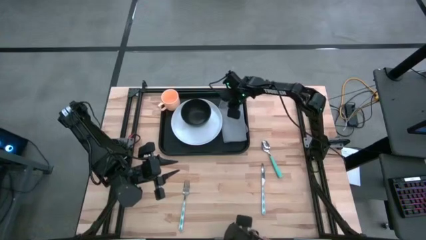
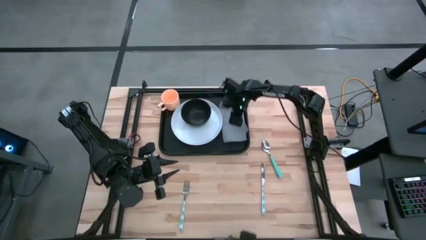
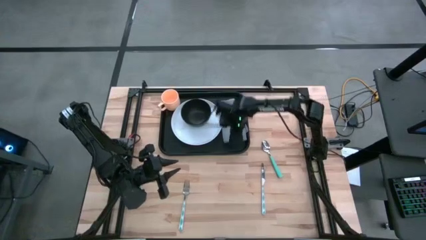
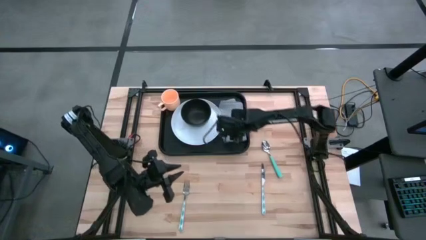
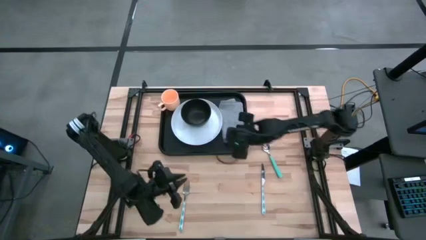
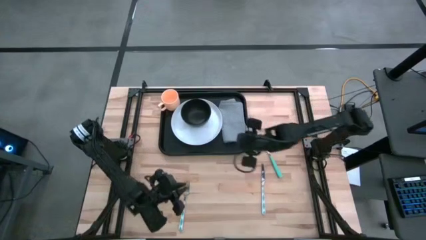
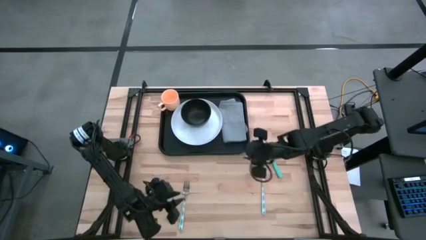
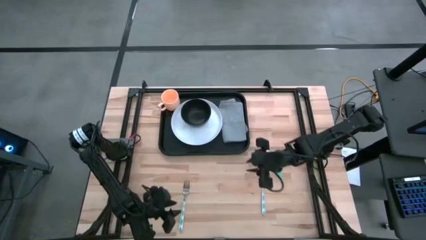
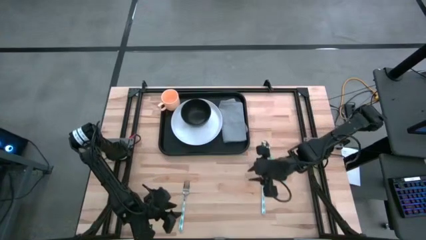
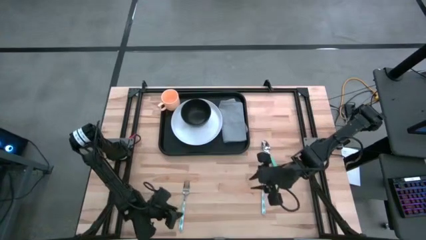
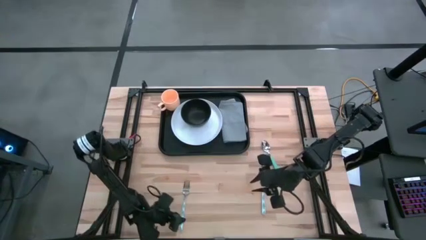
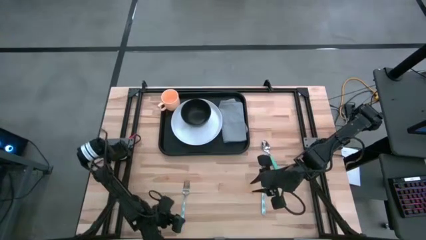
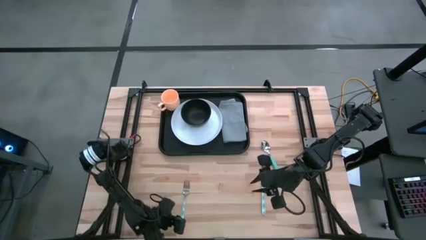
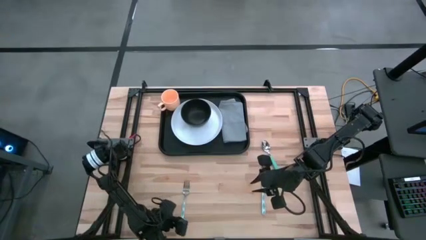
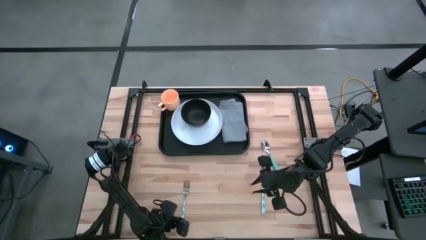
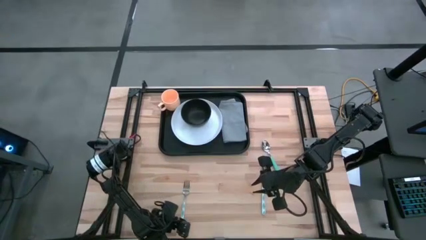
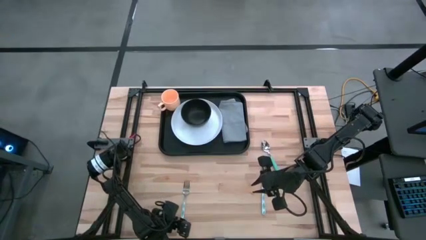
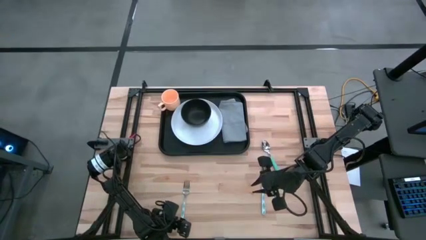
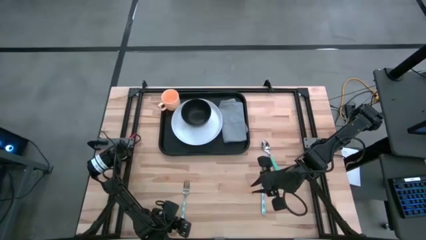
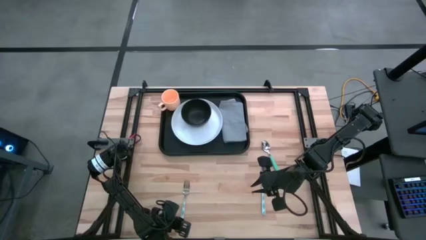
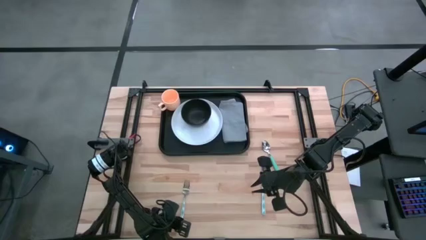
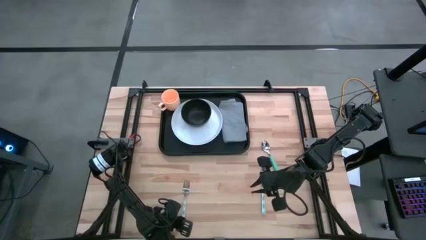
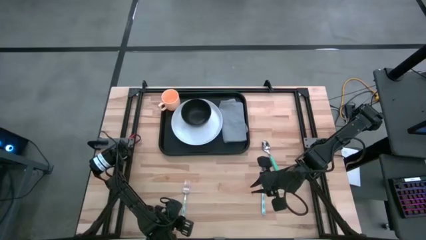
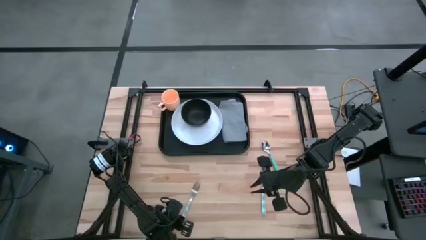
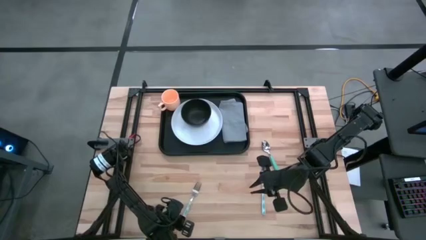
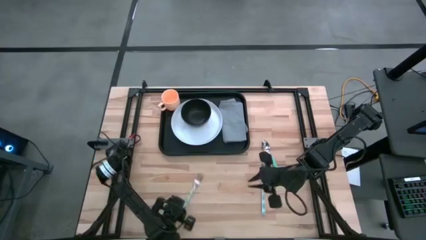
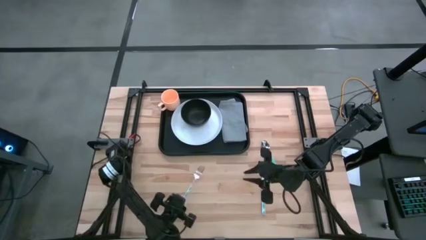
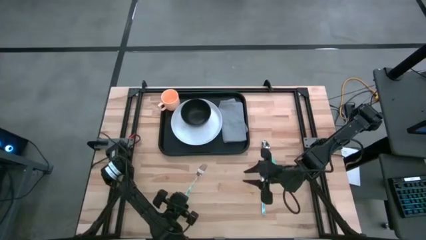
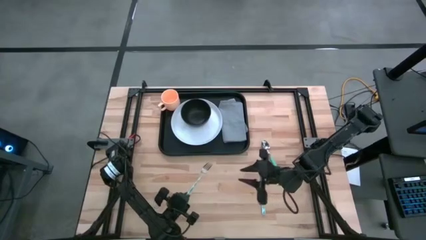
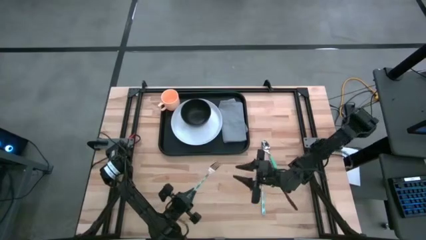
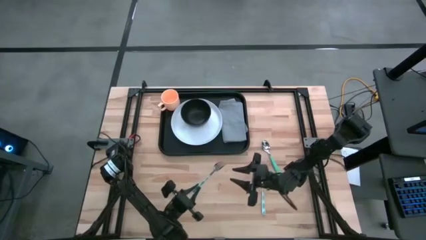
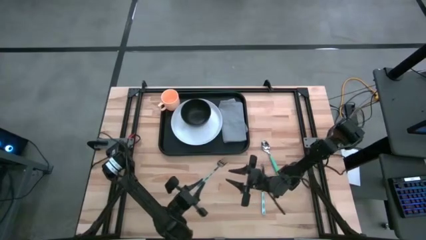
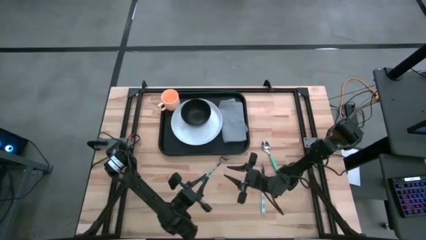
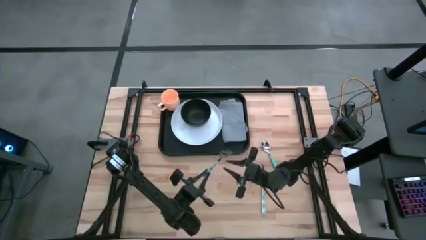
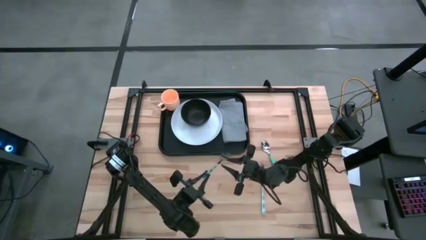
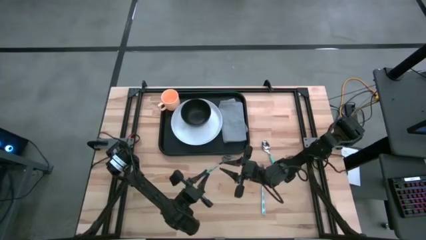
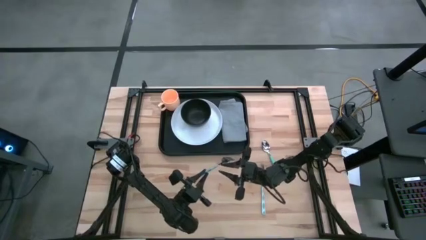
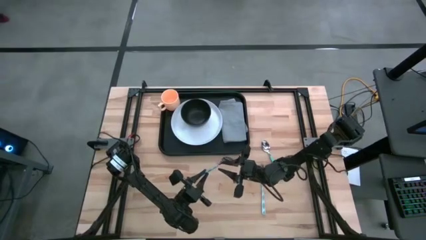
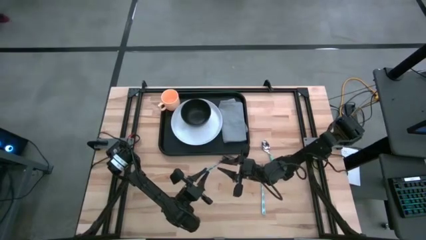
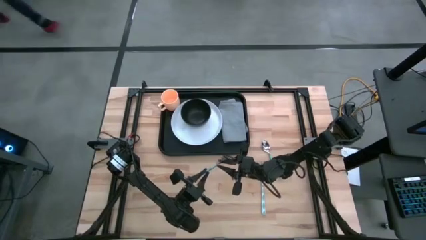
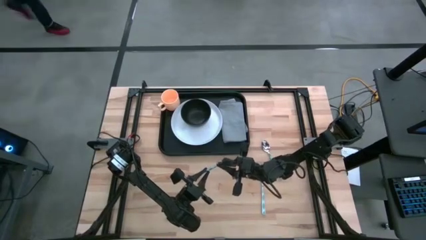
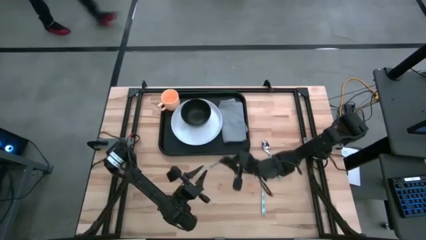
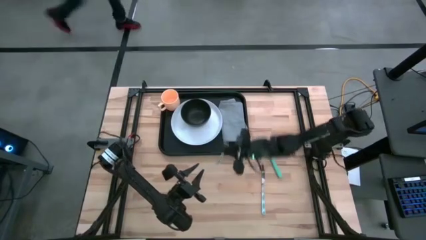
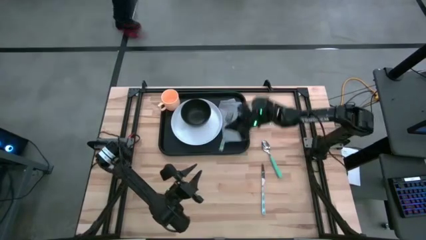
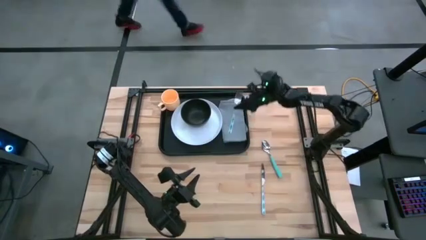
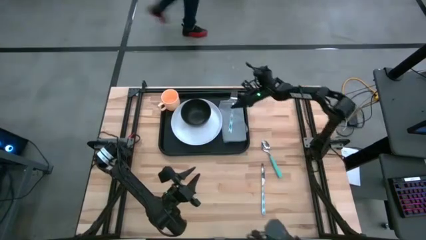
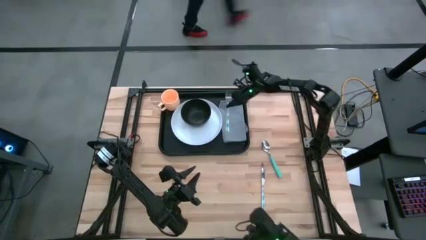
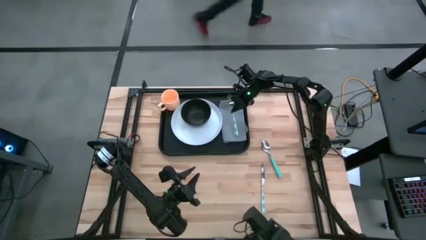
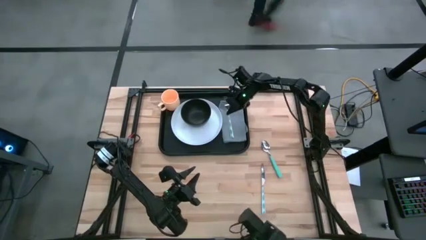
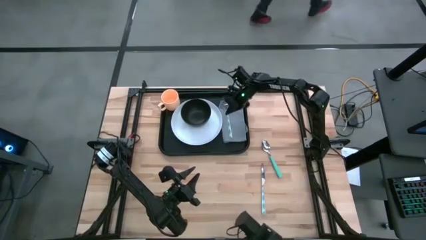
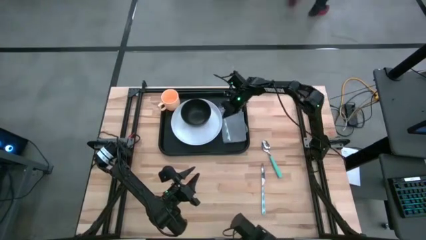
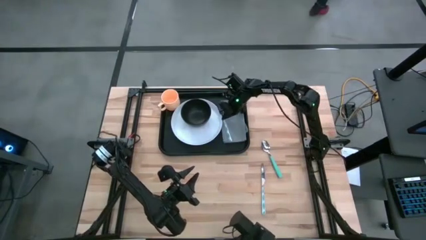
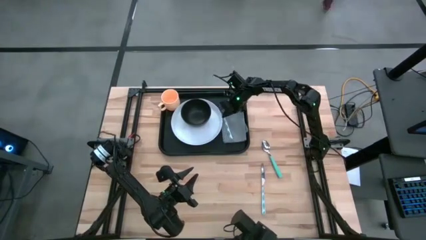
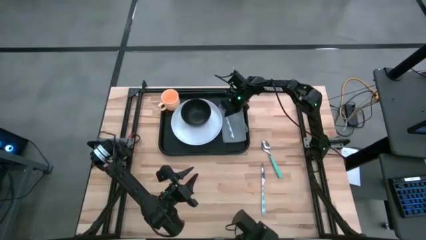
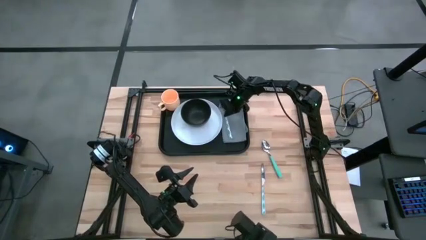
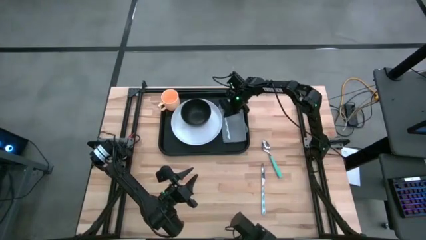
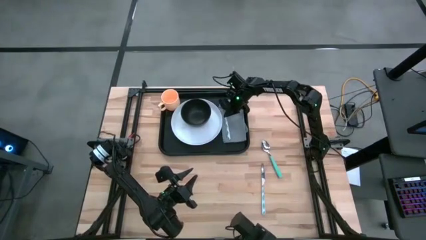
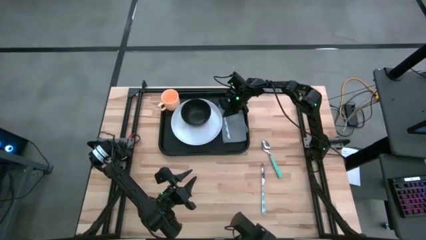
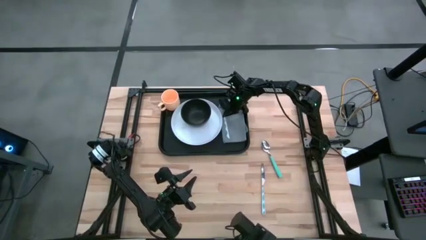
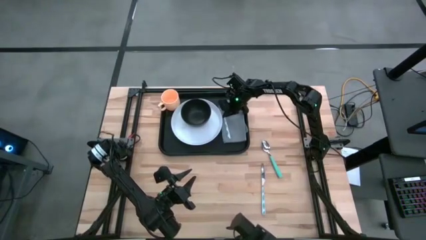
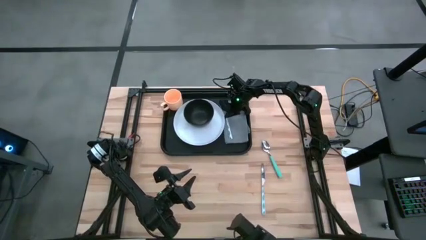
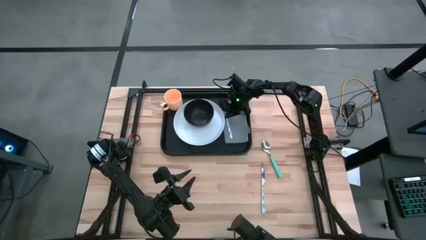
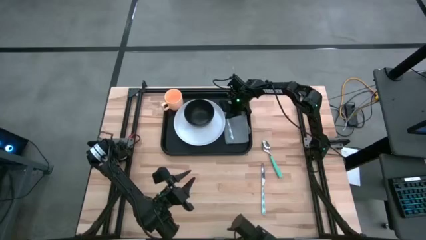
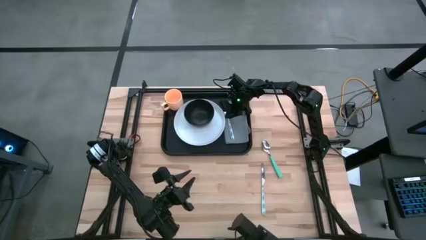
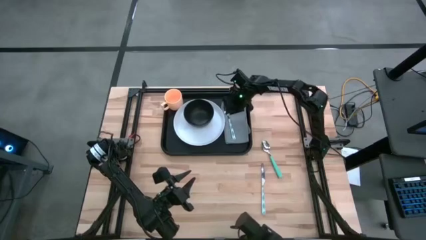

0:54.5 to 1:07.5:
Task: Set up tray
Put the fork on top of the napkin on the serving tray

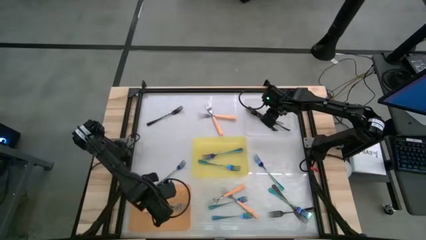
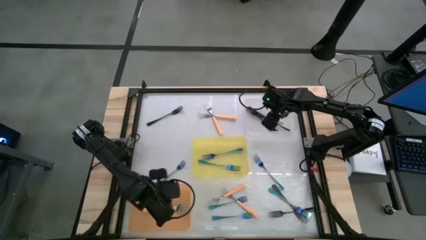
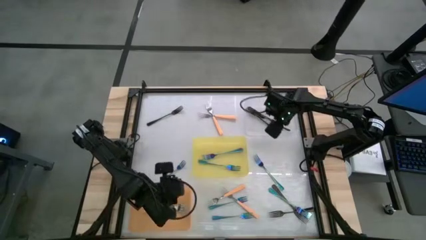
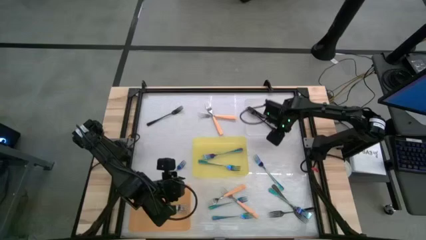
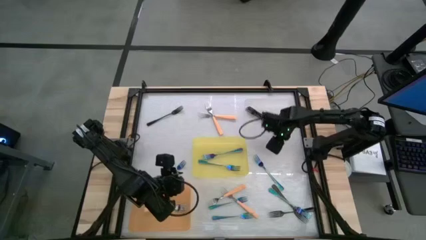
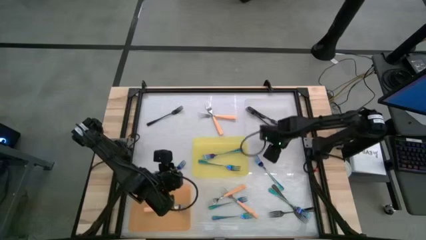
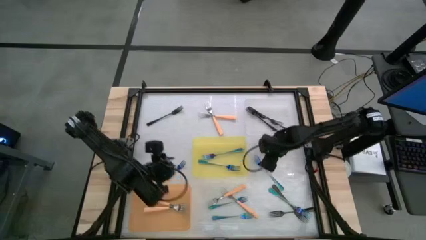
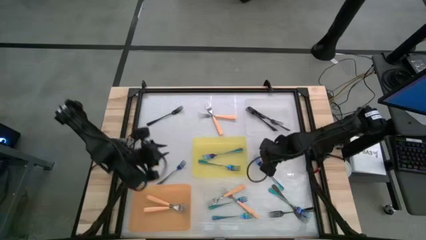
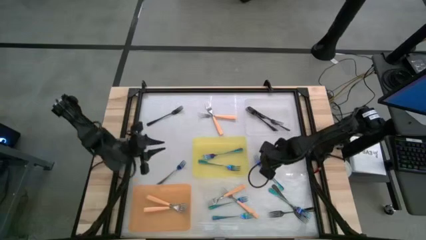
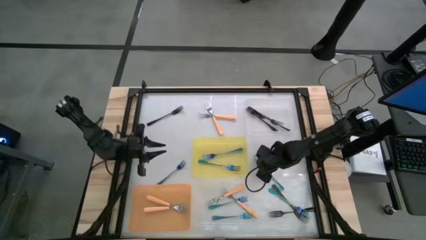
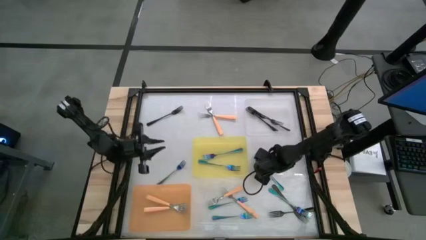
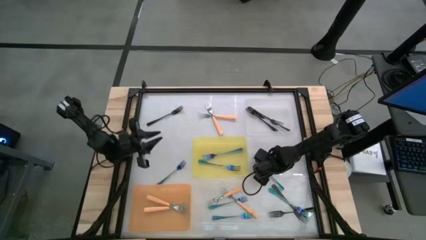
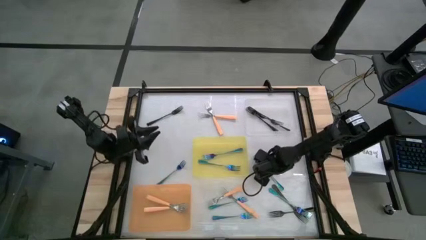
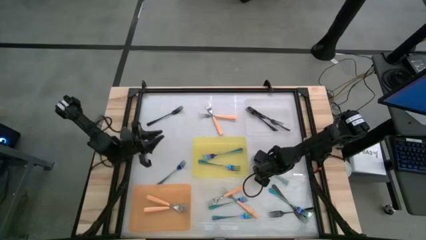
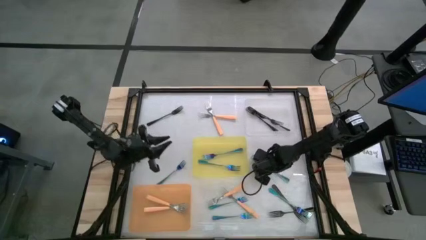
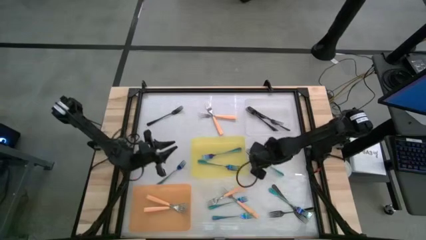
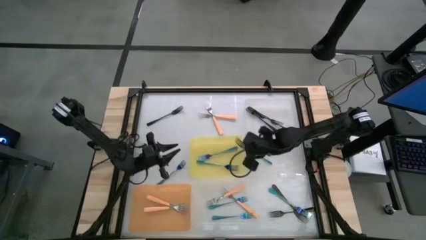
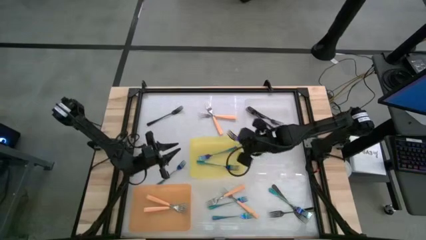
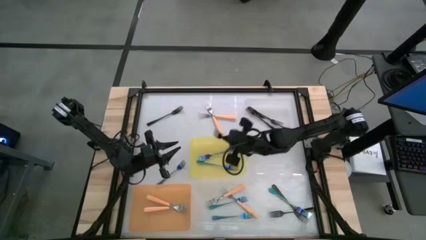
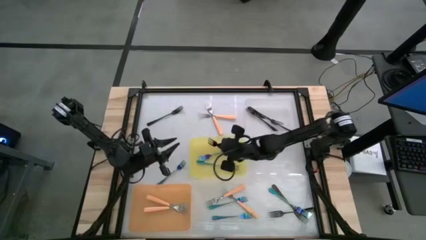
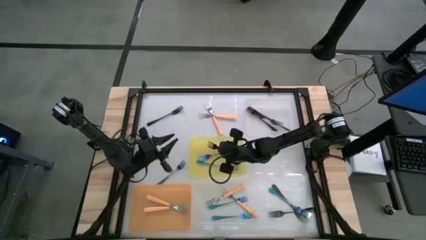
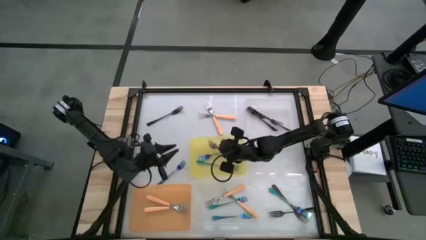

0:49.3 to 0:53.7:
Task: Sort silverware by color (type)
Put the blue fork into the yellow bin
